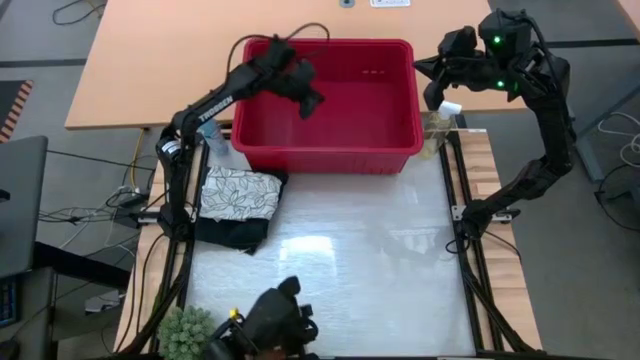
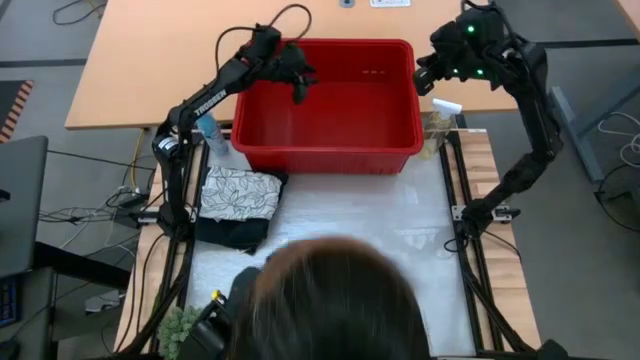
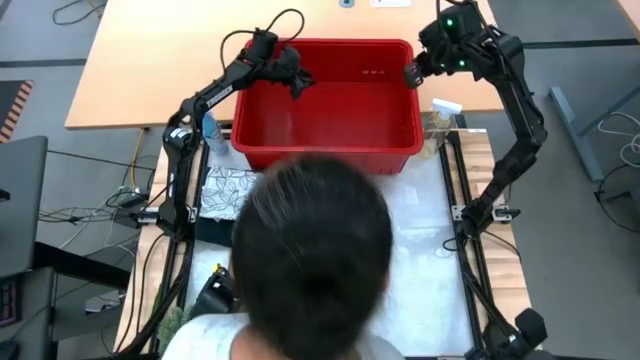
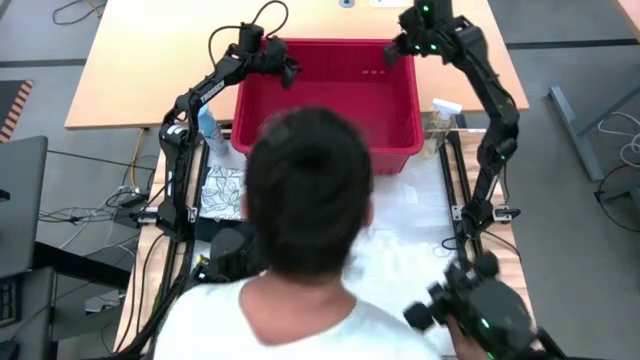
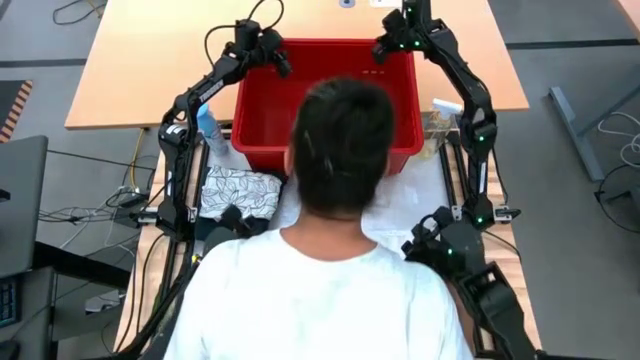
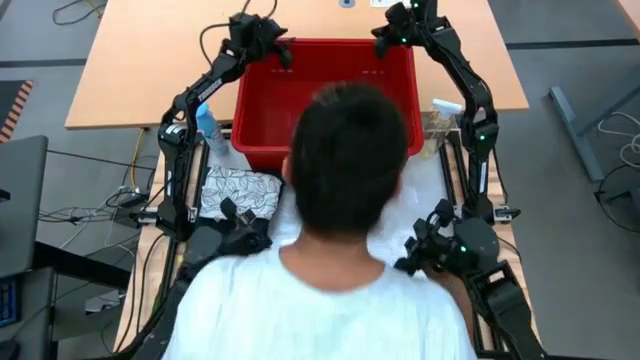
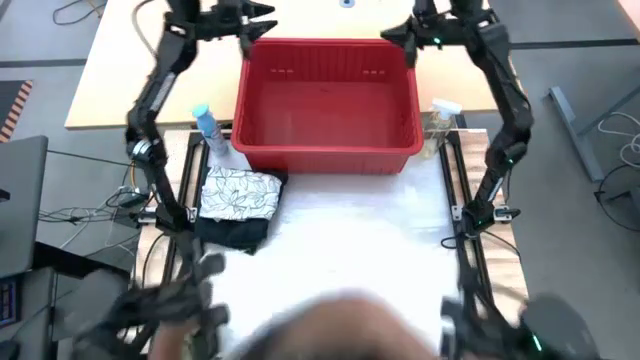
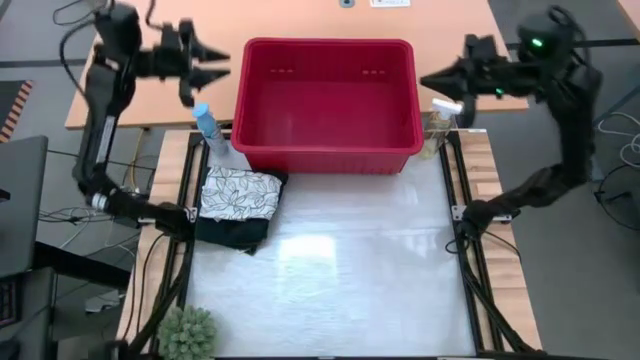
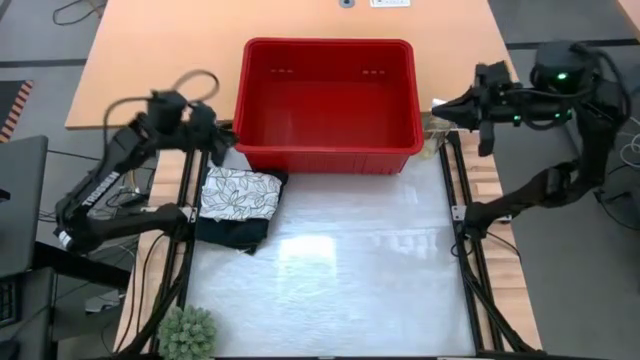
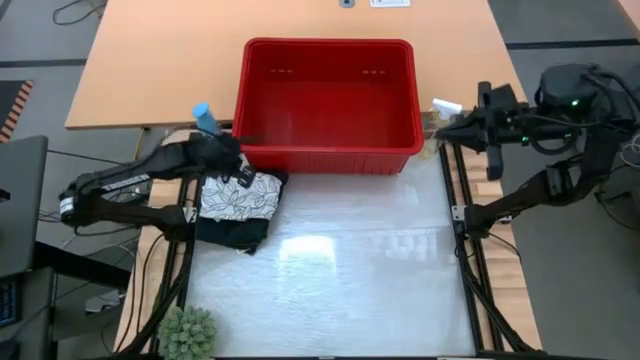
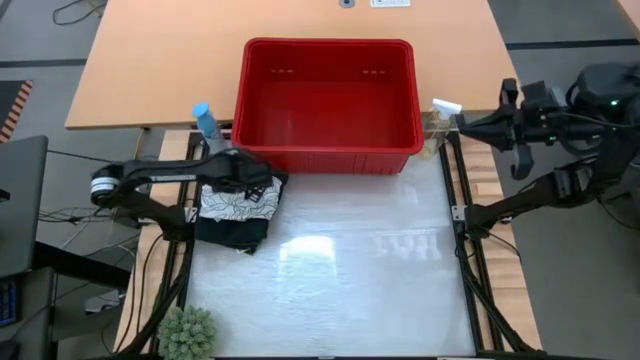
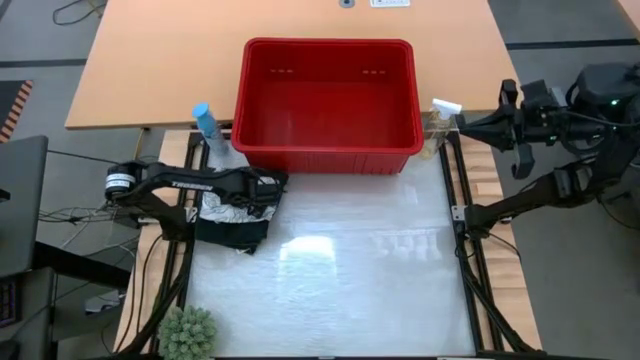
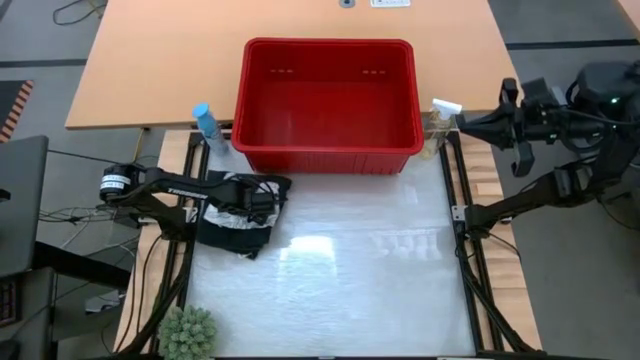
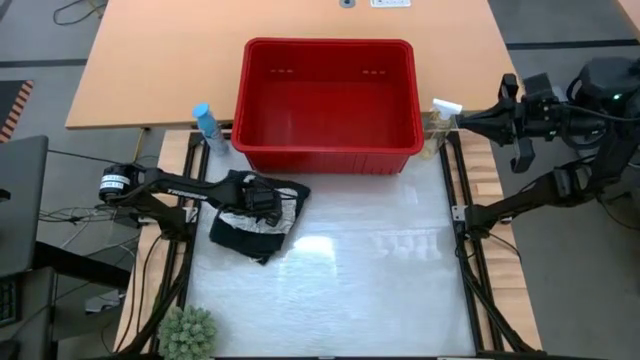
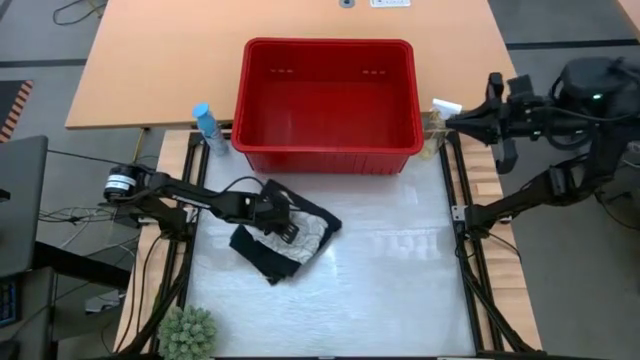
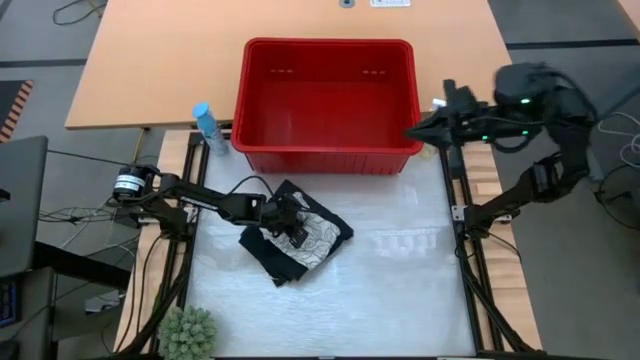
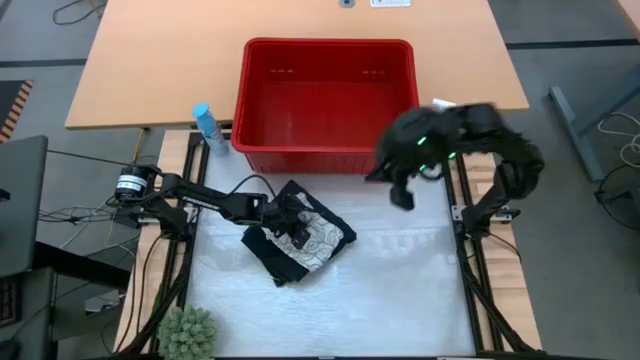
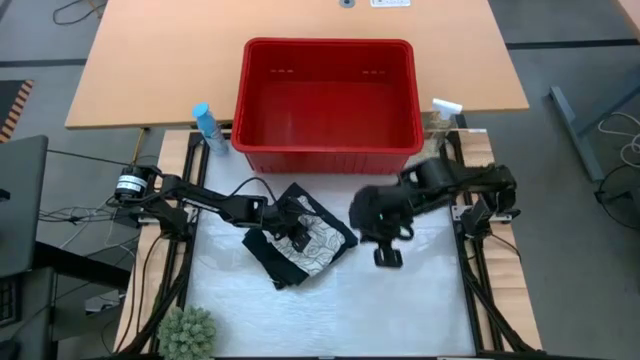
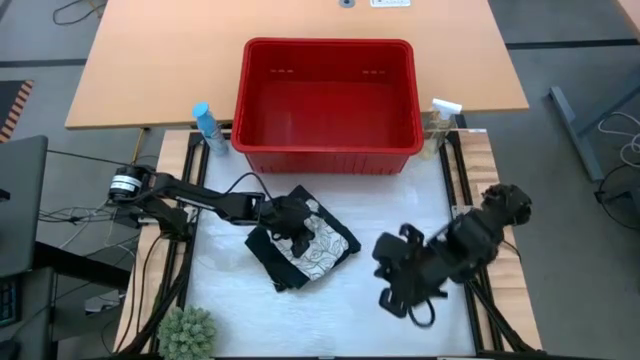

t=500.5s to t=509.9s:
Task: Fold Laundry from Bin
Adjust the stack of folded clothes on the table

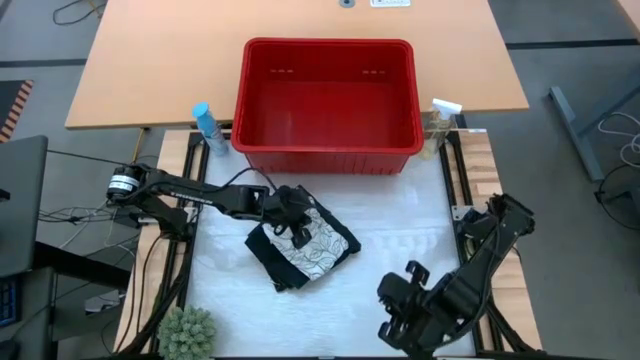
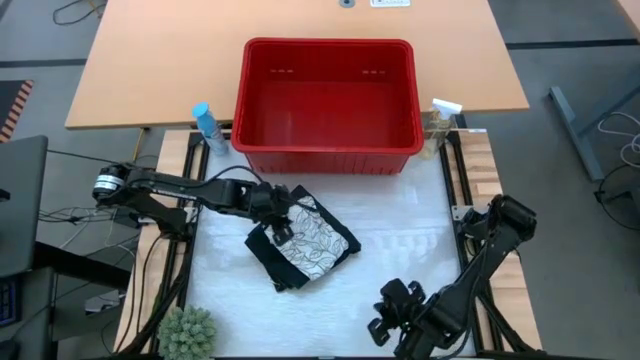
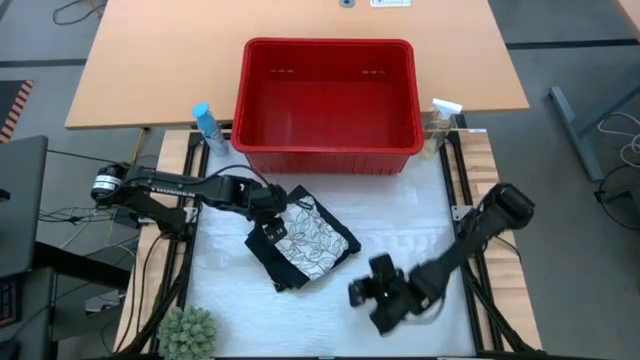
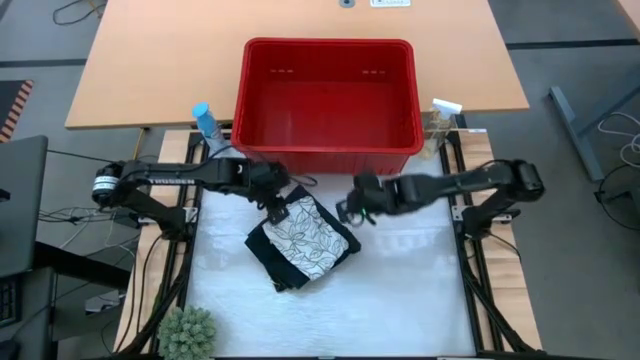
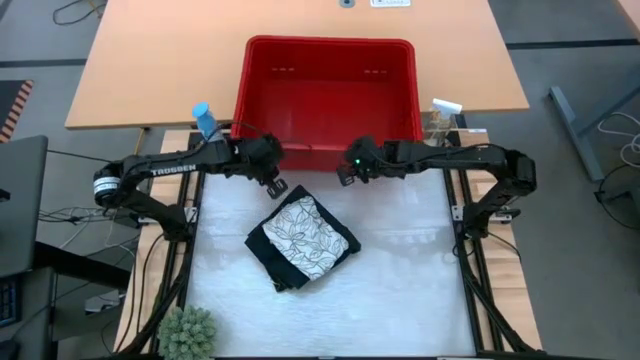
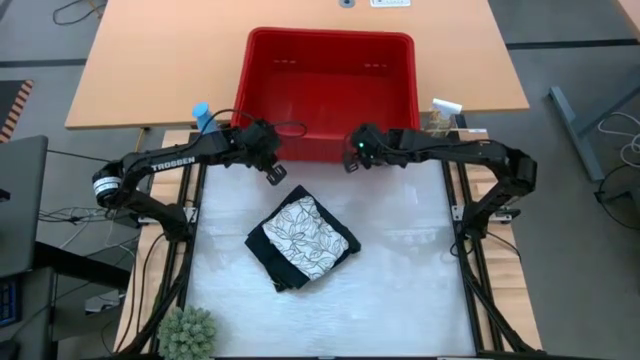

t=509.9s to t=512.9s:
Adjust the red laundry bin

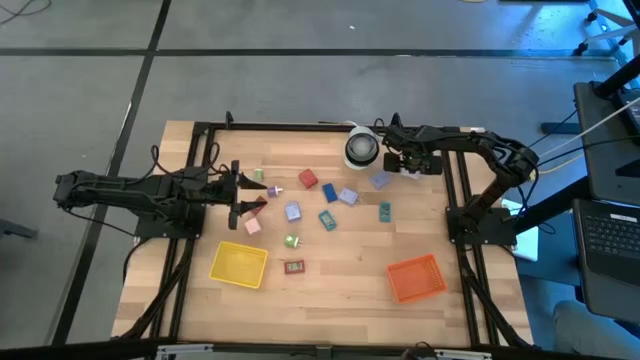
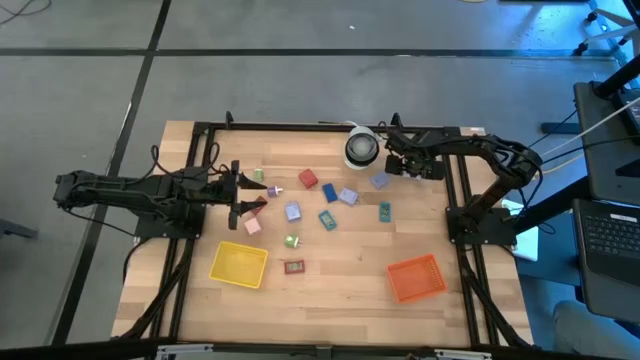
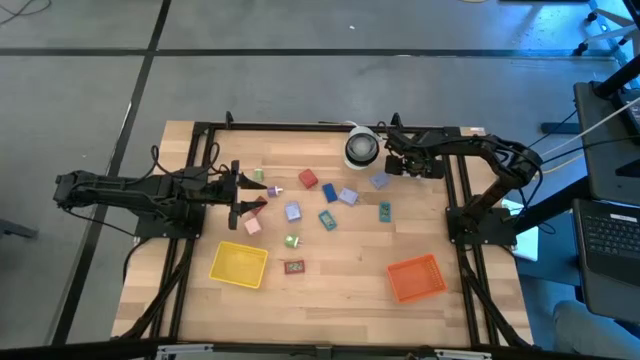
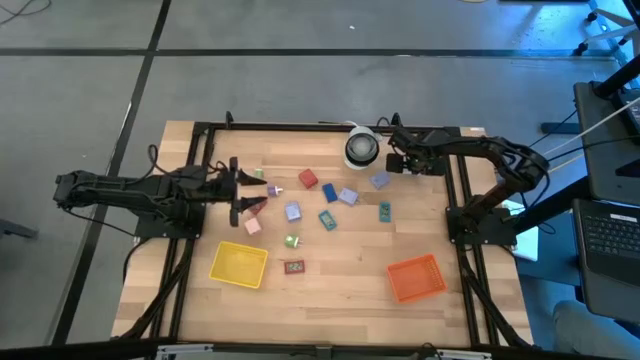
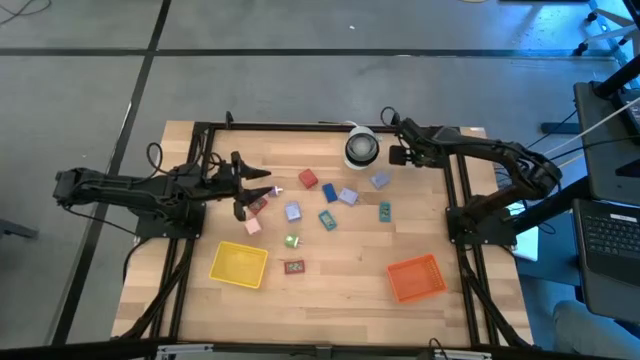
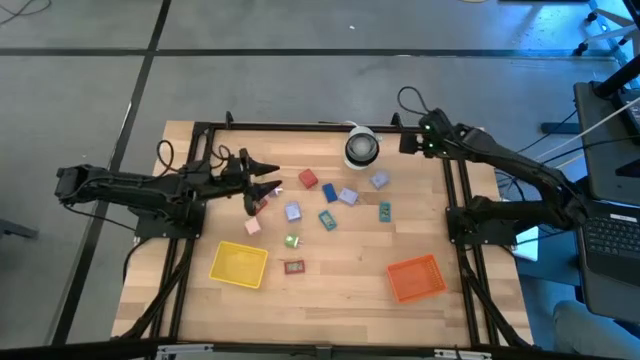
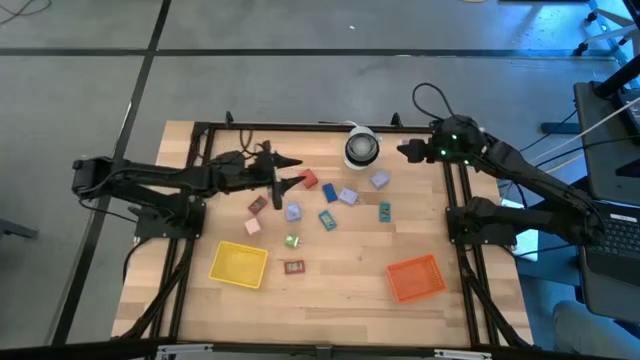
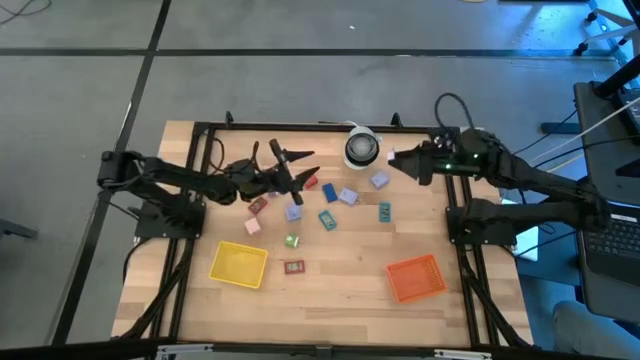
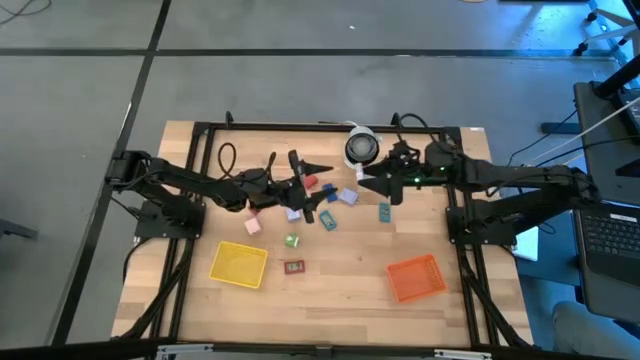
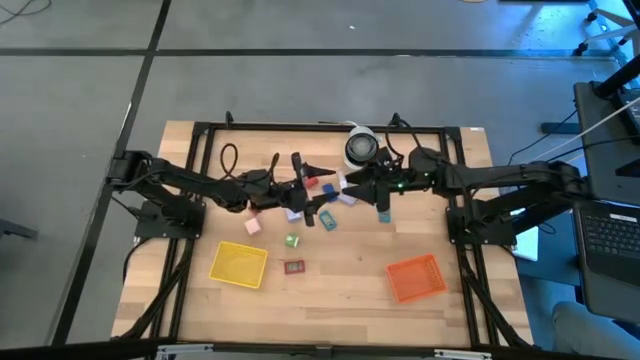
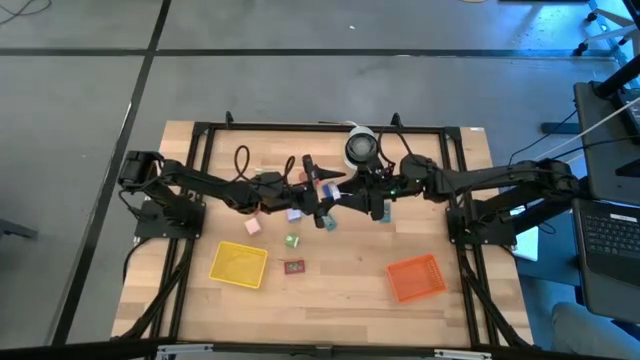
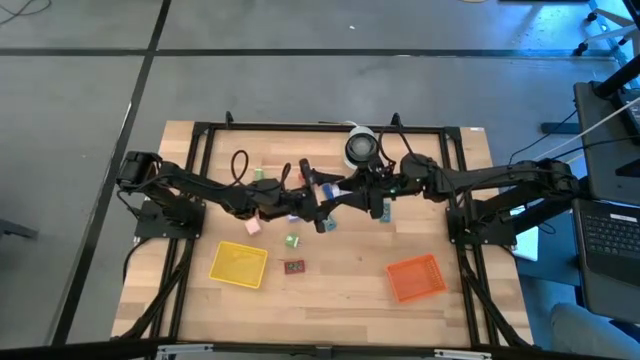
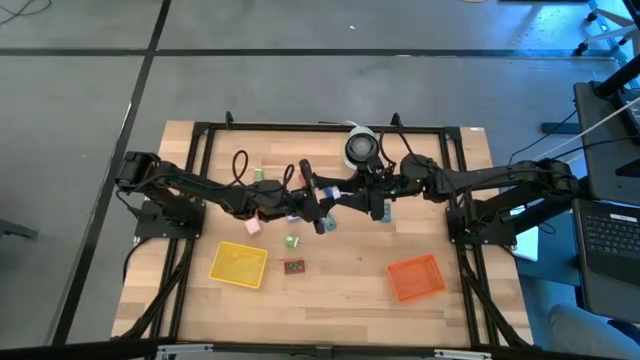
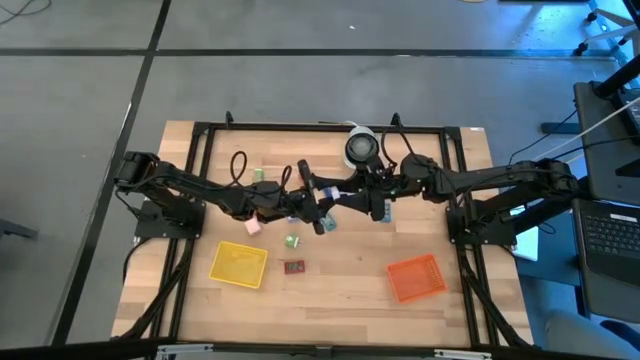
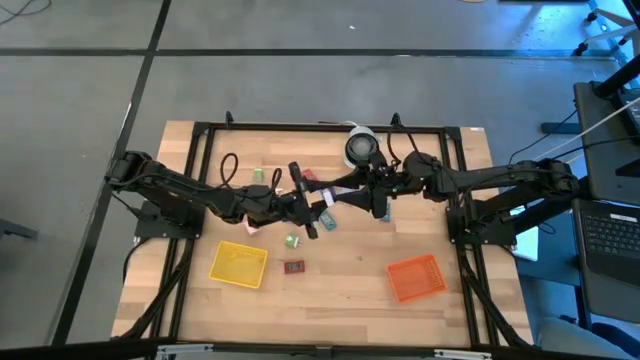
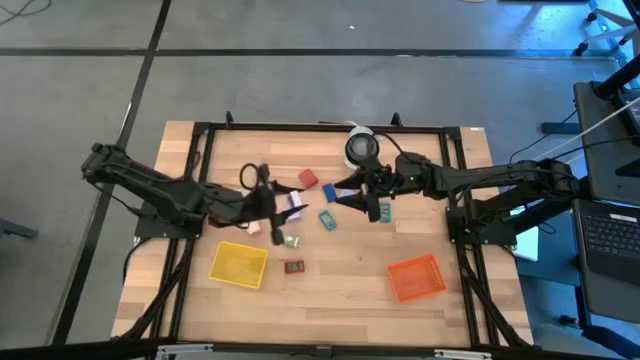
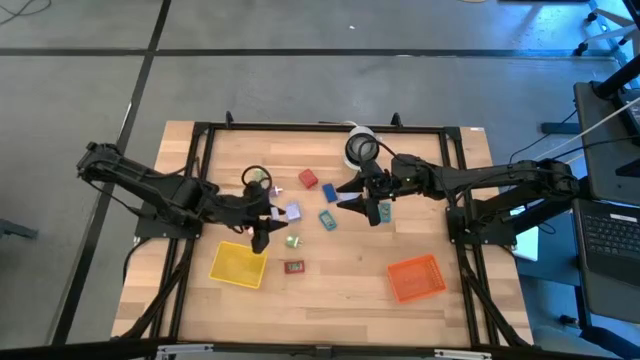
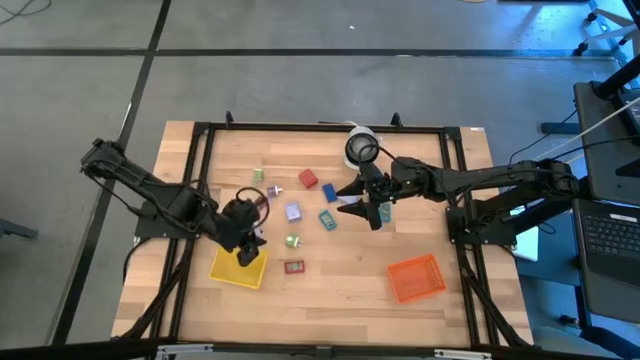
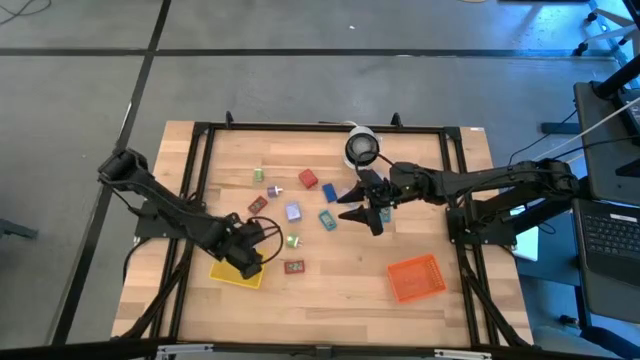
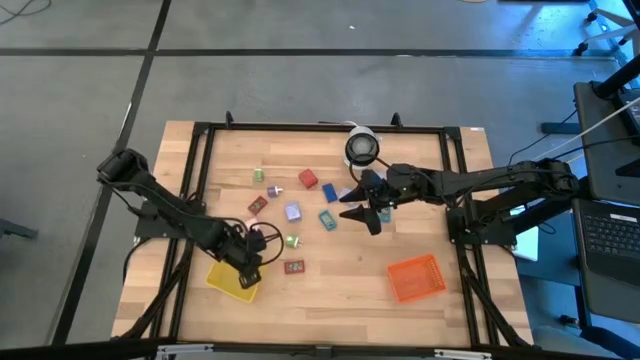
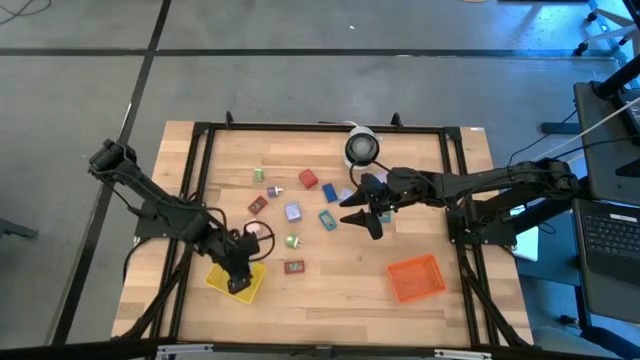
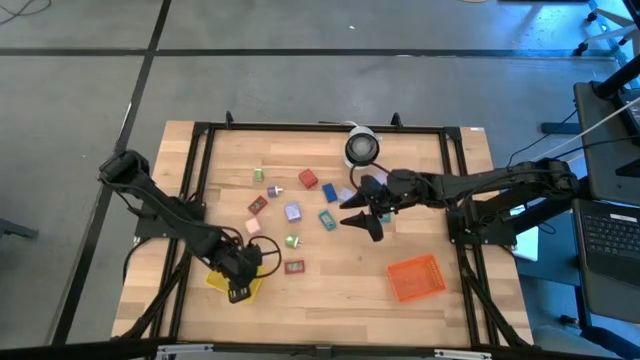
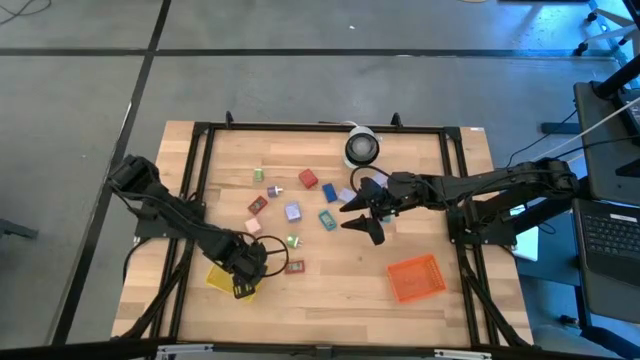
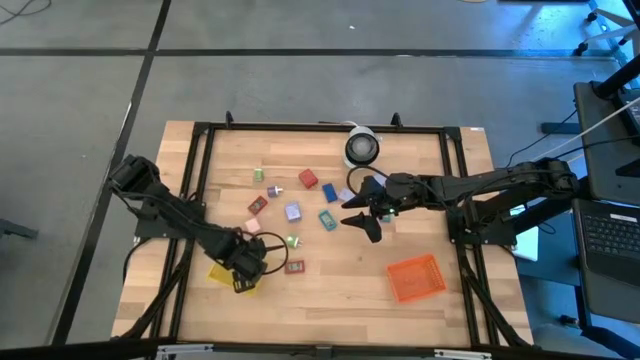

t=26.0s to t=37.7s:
Task: Pick & Place Office items
Put the white digital timer into the yellow bin
